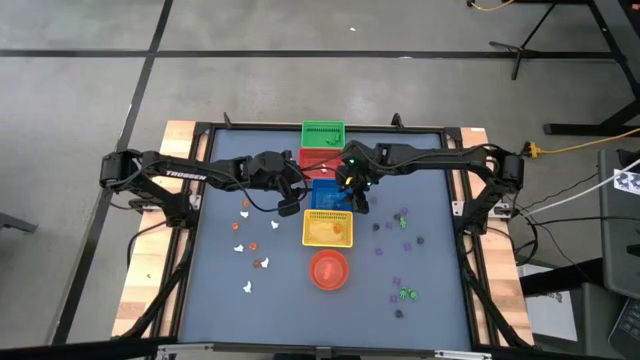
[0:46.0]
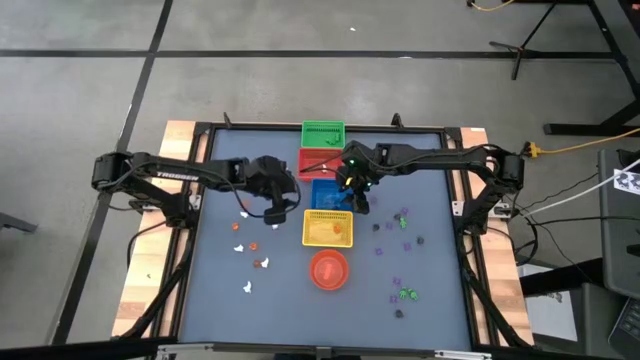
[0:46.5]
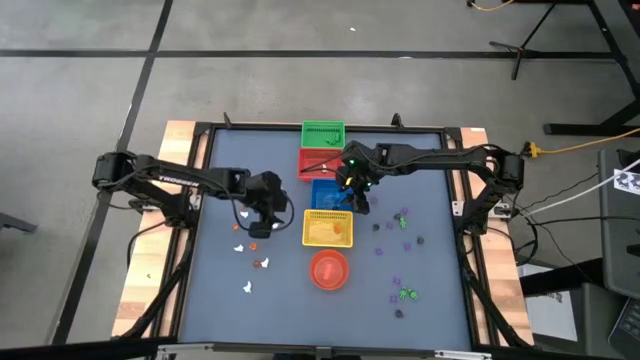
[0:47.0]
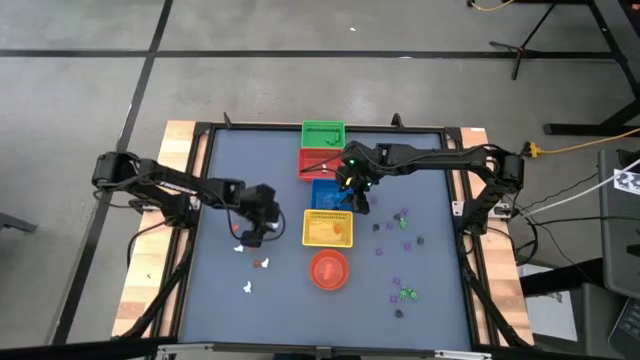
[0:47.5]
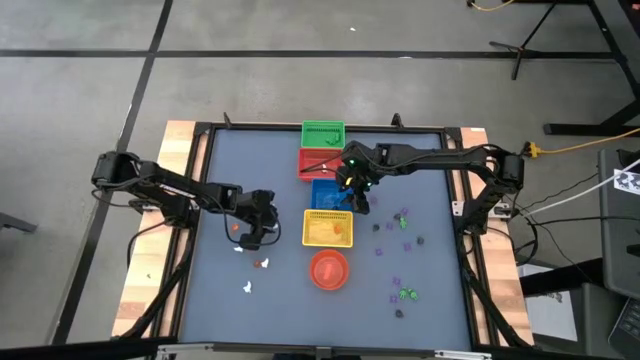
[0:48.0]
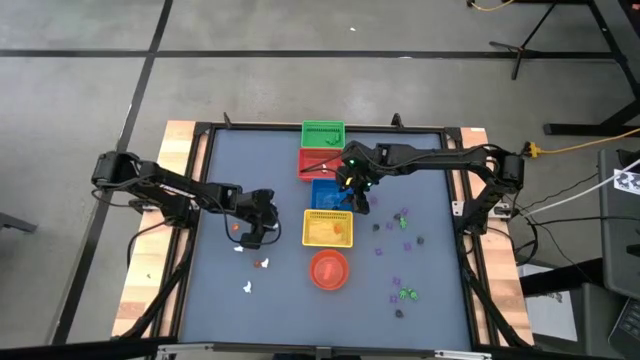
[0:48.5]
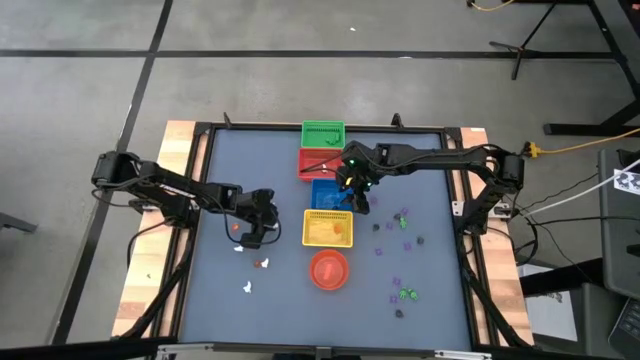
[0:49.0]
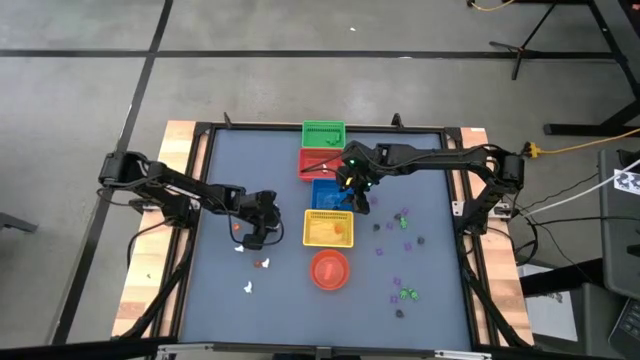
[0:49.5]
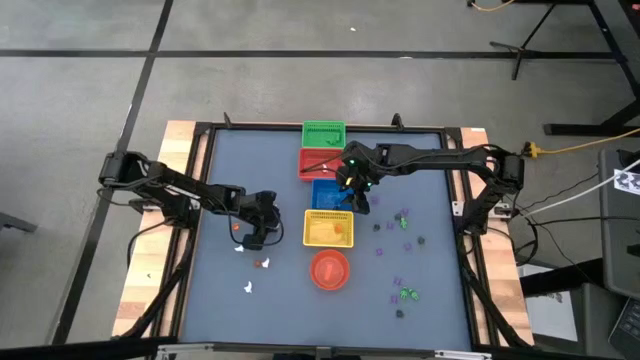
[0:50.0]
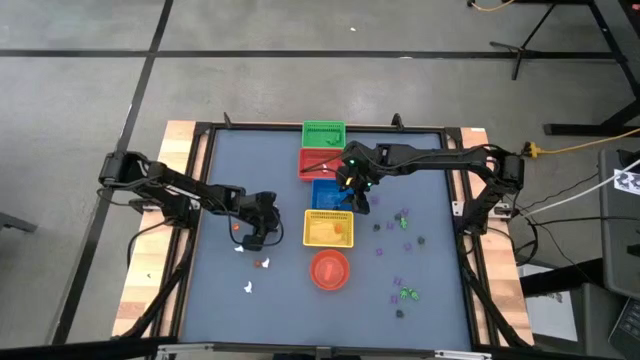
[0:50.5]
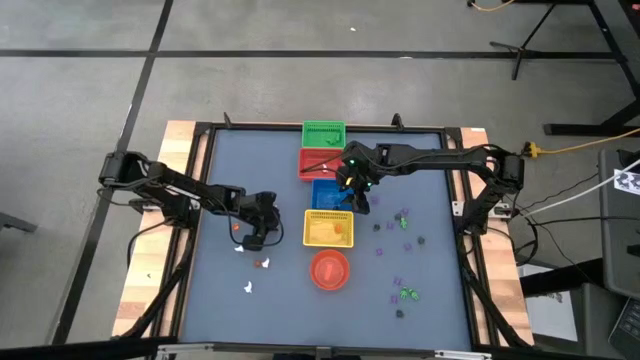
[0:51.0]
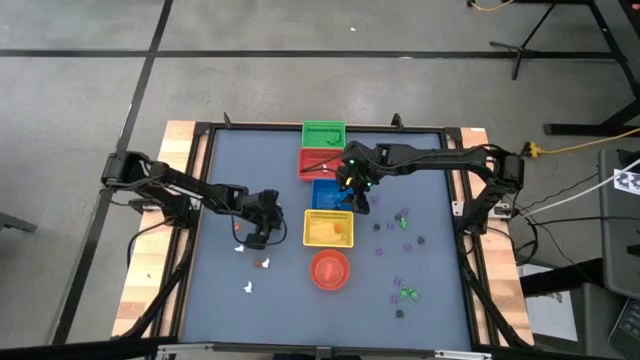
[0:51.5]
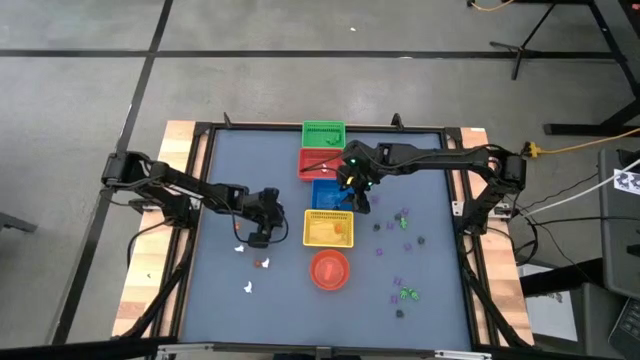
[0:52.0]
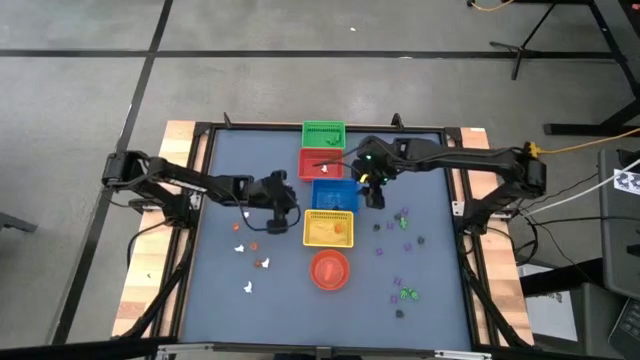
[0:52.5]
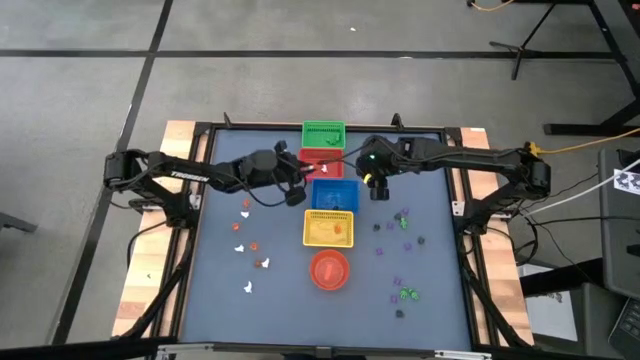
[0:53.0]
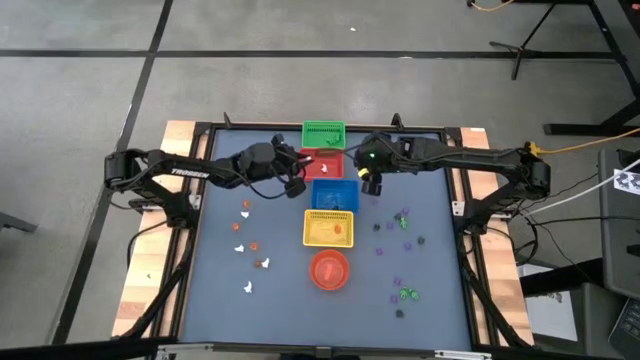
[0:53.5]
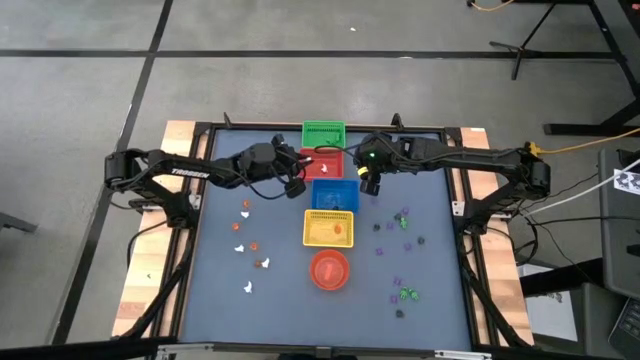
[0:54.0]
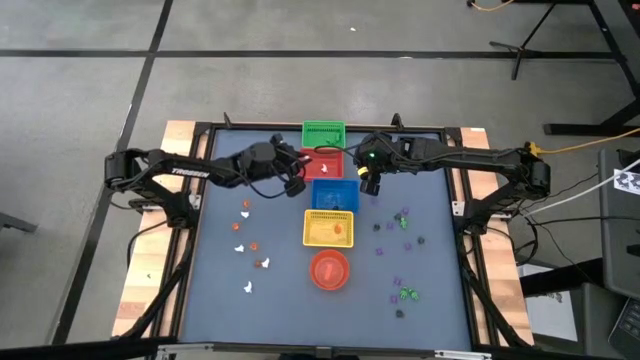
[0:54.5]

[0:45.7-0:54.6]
Task: Sort Halloween decoration
Put the white ghost toy into the red bin

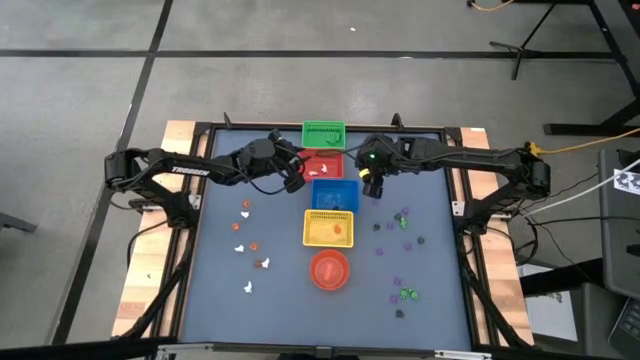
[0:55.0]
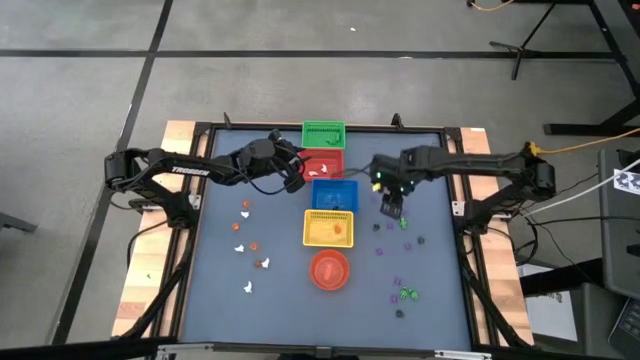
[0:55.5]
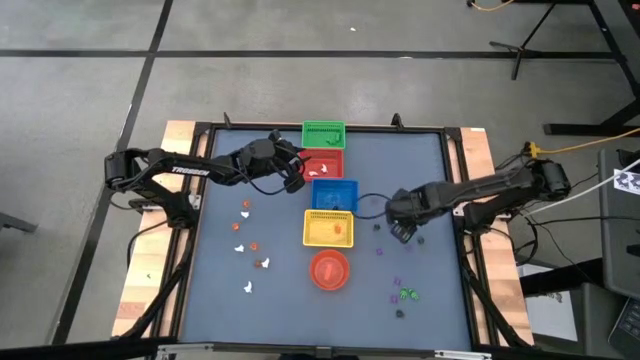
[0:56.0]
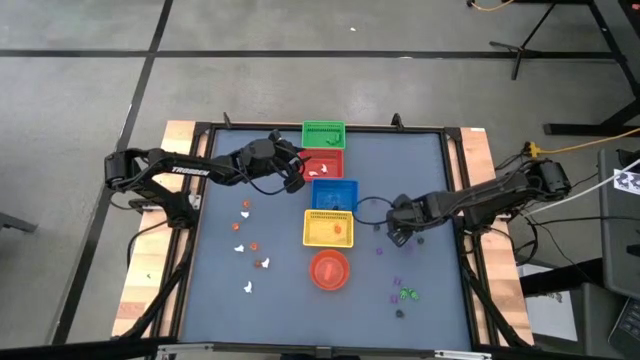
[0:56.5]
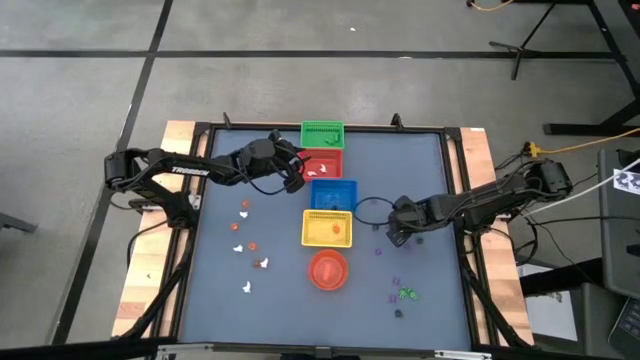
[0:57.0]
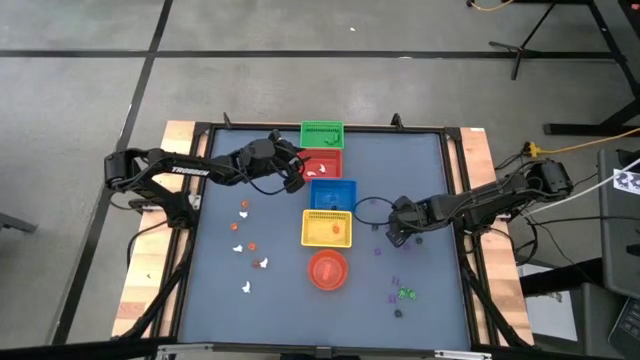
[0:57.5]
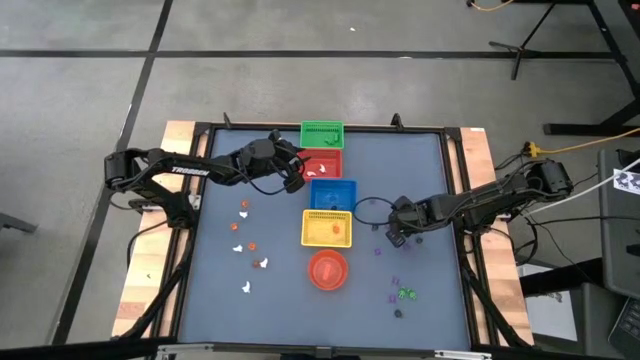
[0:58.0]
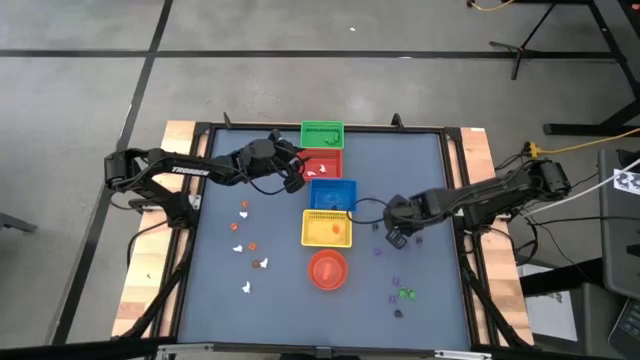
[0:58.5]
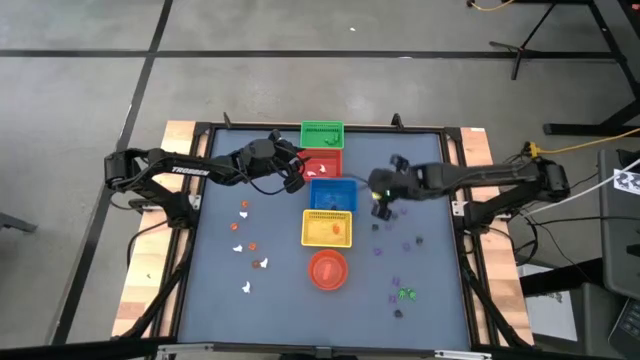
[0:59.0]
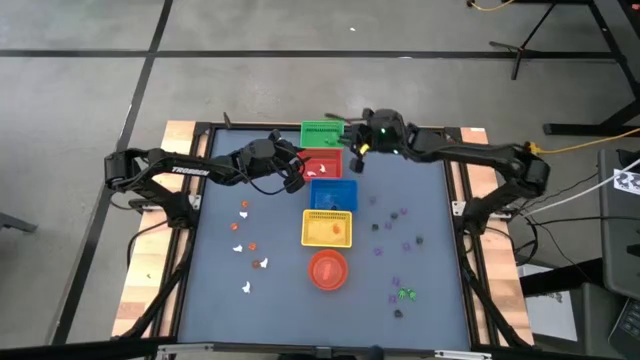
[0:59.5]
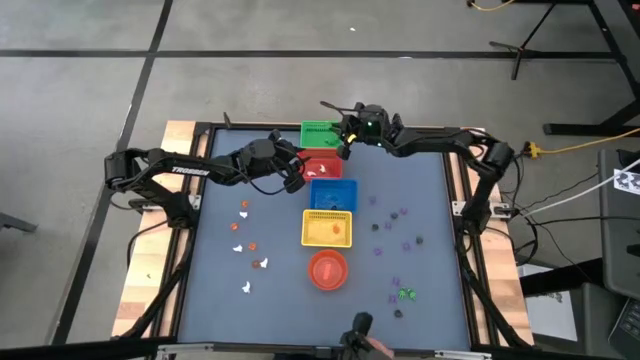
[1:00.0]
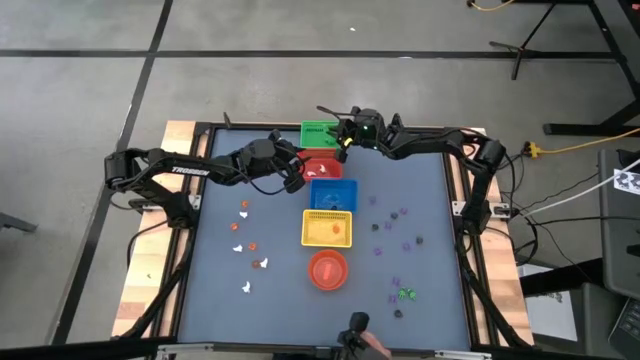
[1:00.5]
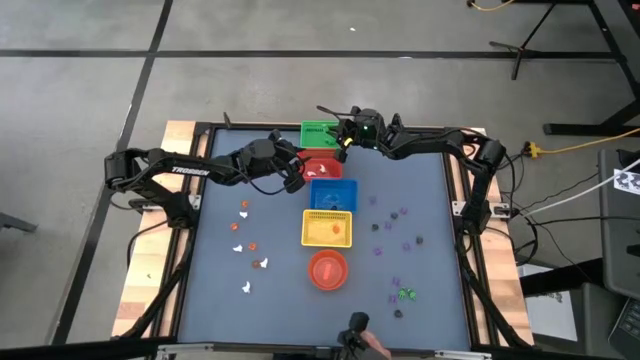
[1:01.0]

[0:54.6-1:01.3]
Put the green skeleton toy into the green bin

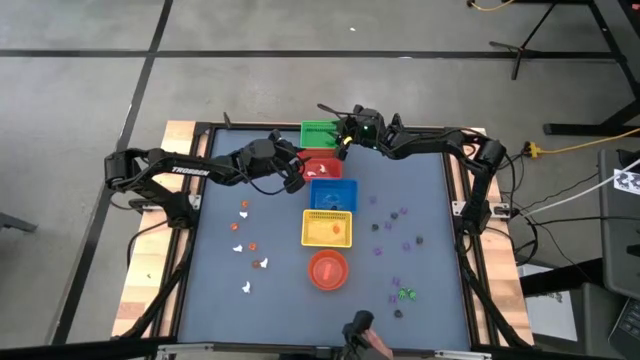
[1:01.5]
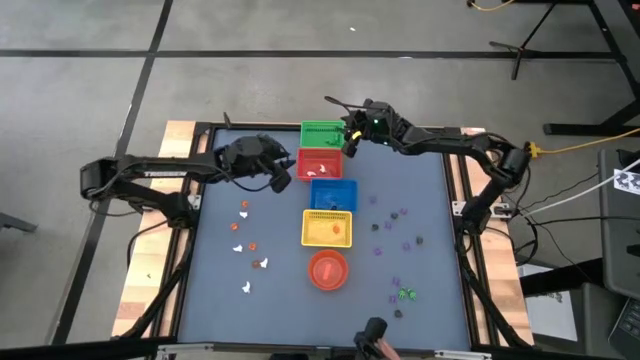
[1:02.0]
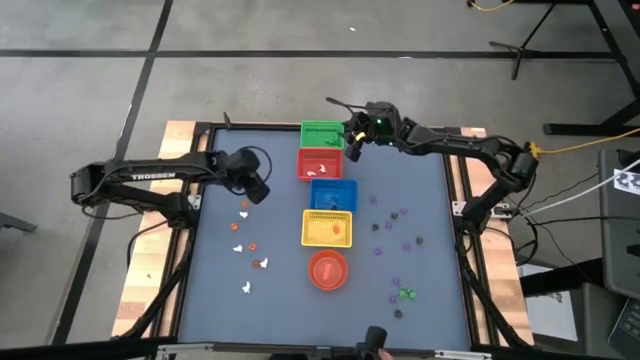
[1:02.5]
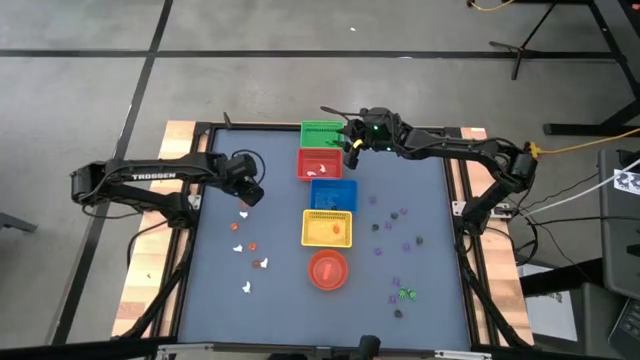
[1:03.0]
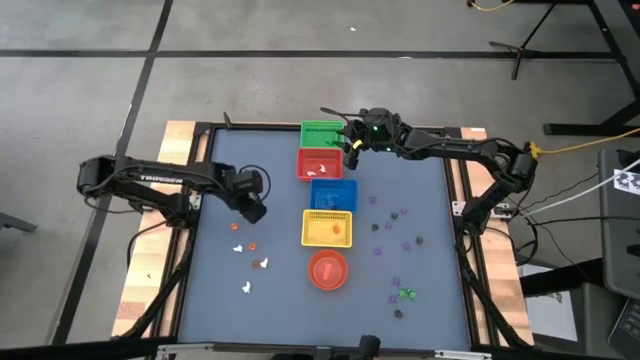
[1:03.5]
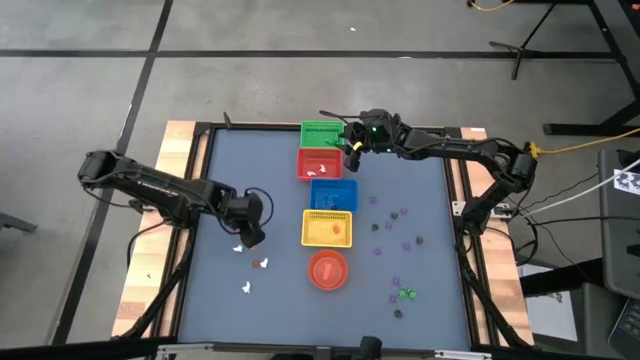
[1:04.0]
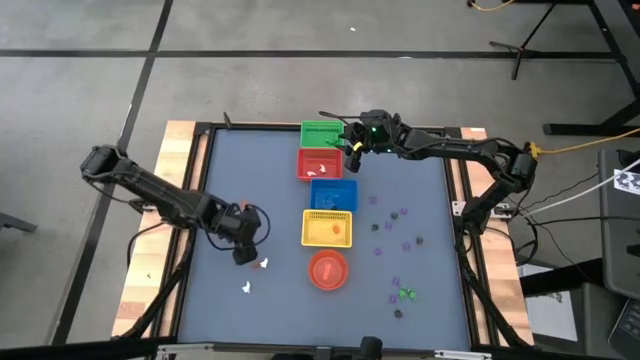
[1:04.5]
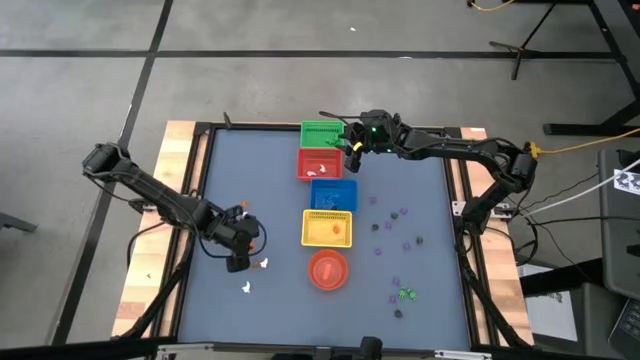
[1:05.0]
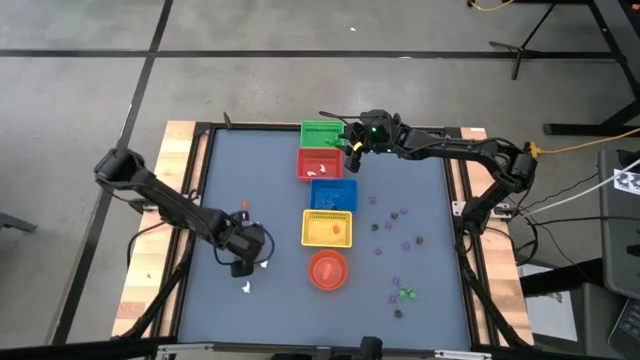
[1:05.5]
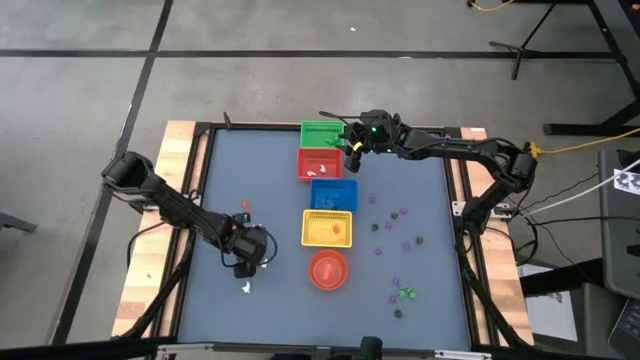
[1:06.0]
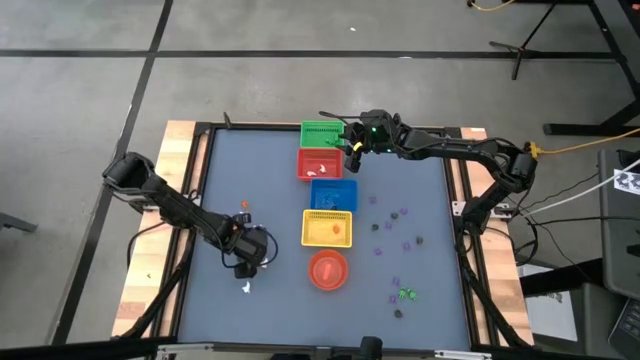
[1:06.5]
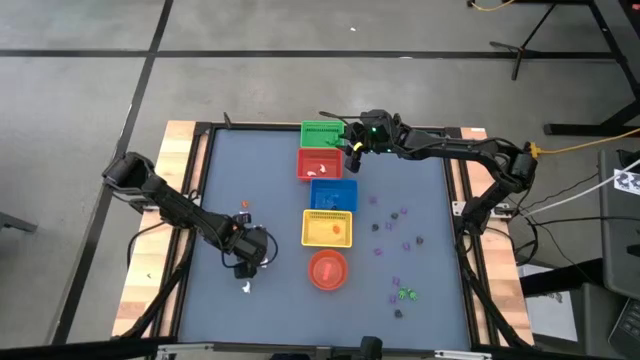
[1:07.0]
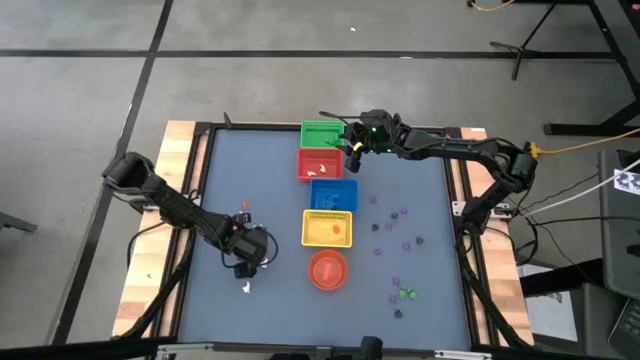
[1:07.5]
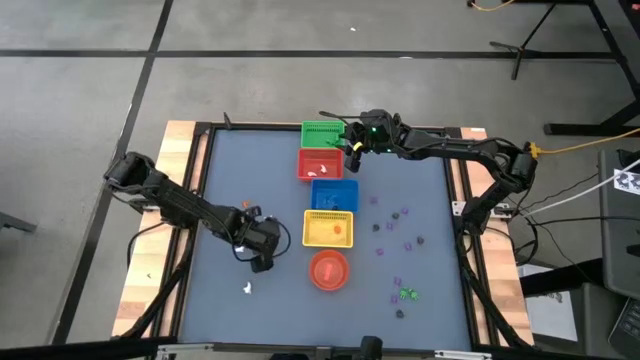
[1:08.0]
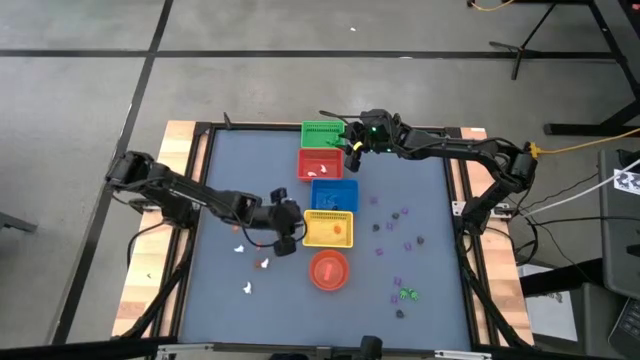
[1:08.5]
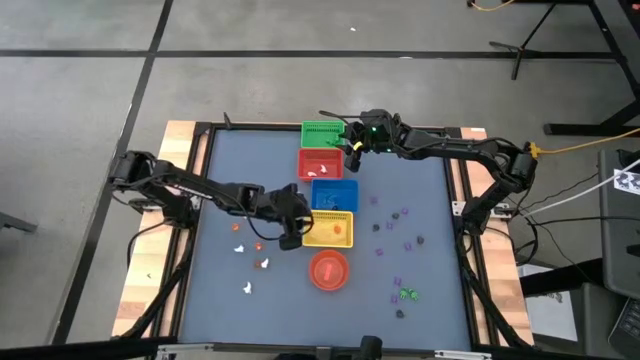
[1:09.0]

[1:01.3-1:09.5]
Put the orange pumpkin toy into the yellow bin
